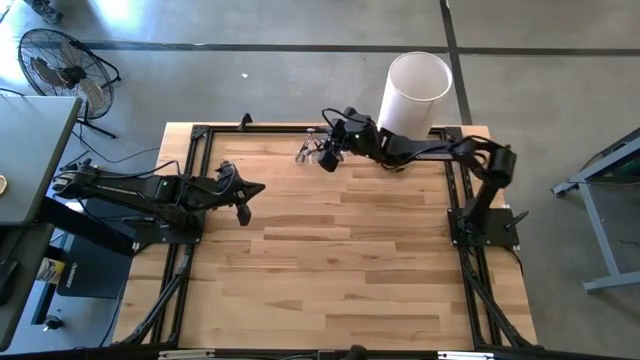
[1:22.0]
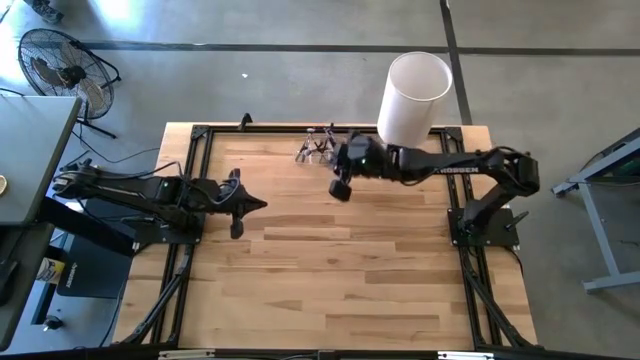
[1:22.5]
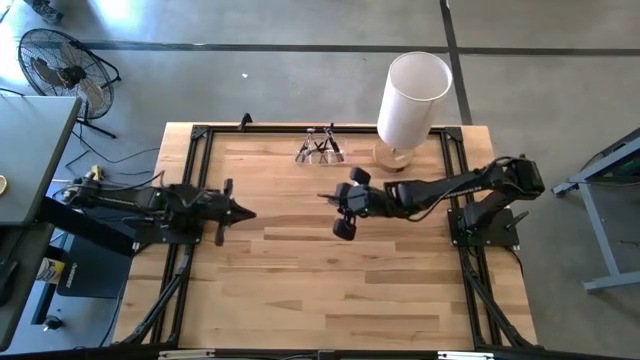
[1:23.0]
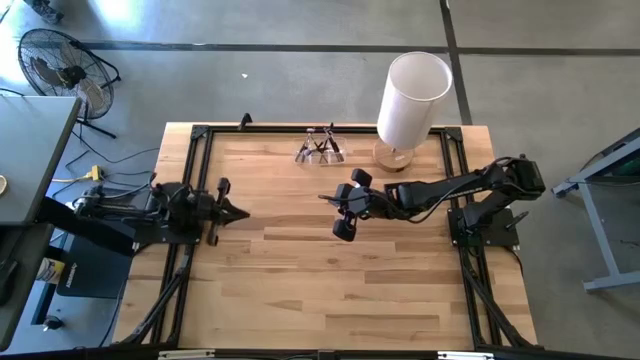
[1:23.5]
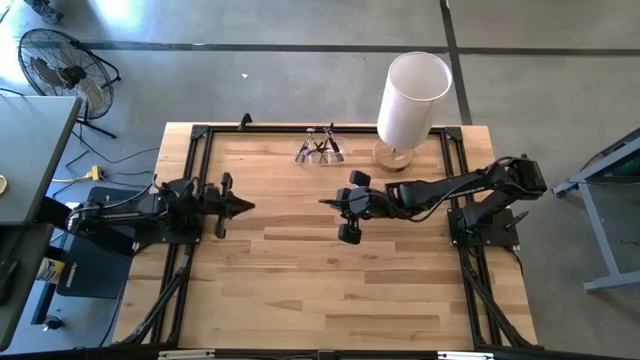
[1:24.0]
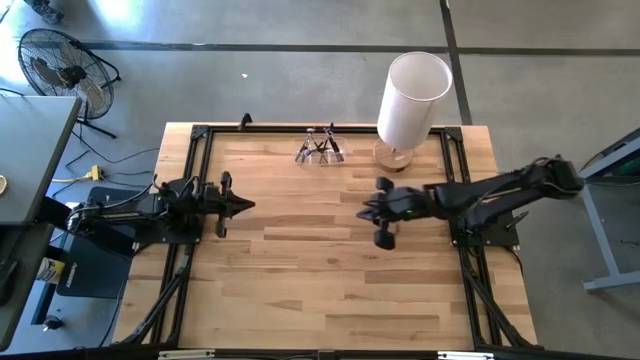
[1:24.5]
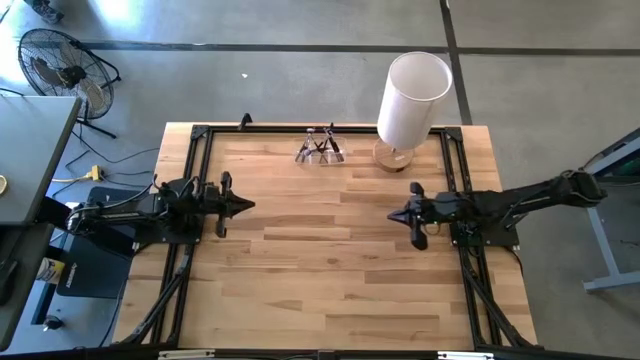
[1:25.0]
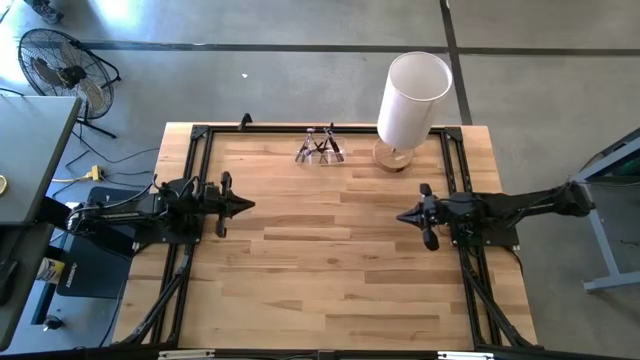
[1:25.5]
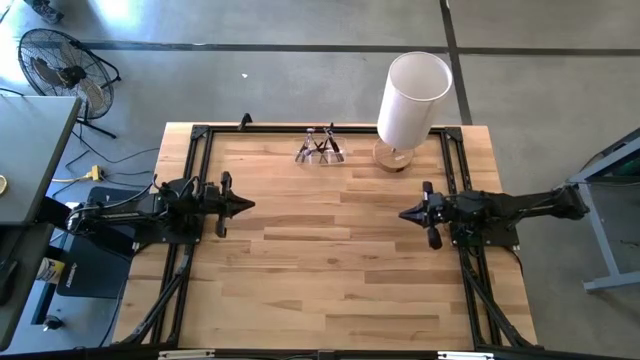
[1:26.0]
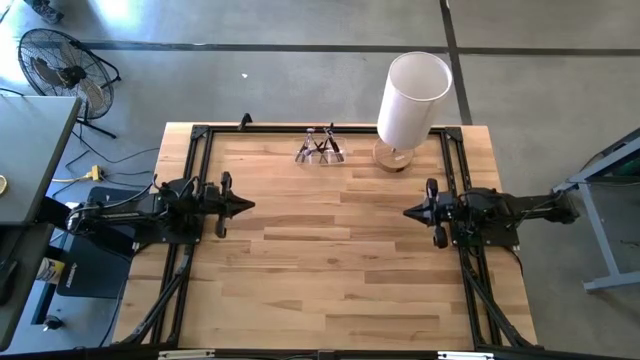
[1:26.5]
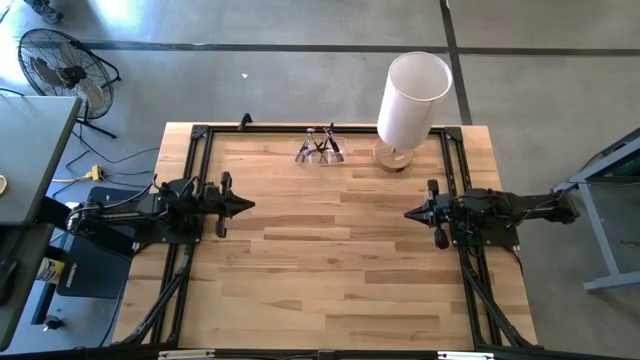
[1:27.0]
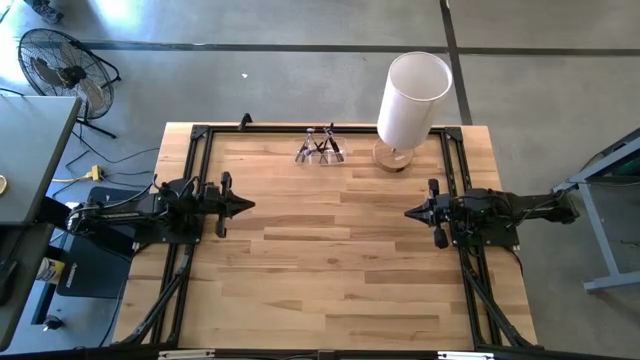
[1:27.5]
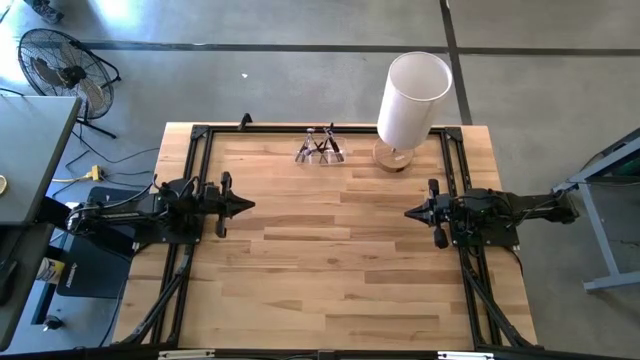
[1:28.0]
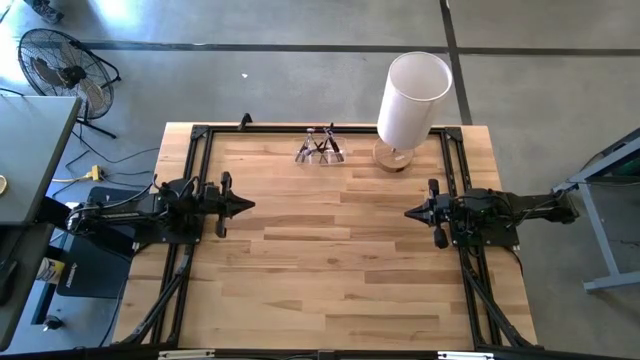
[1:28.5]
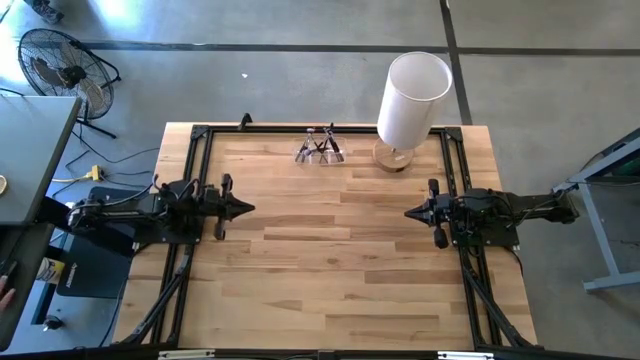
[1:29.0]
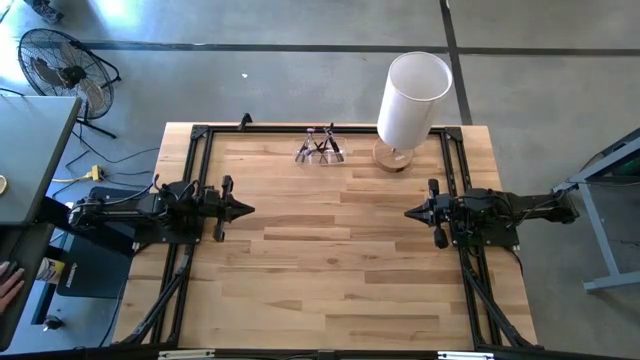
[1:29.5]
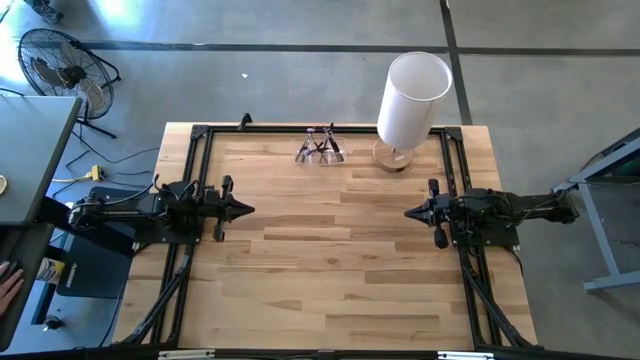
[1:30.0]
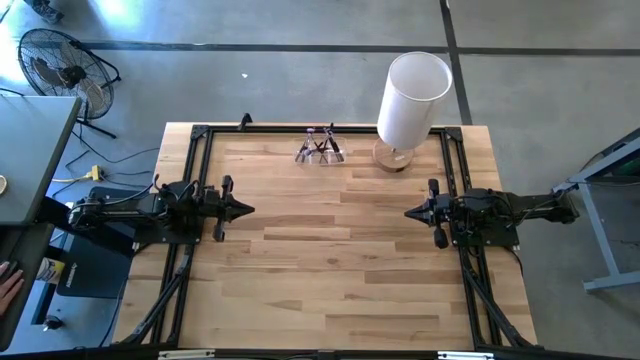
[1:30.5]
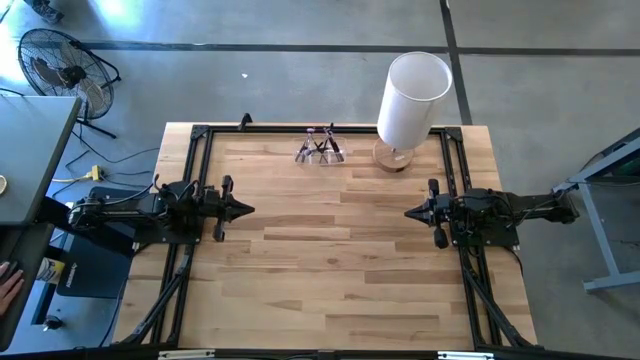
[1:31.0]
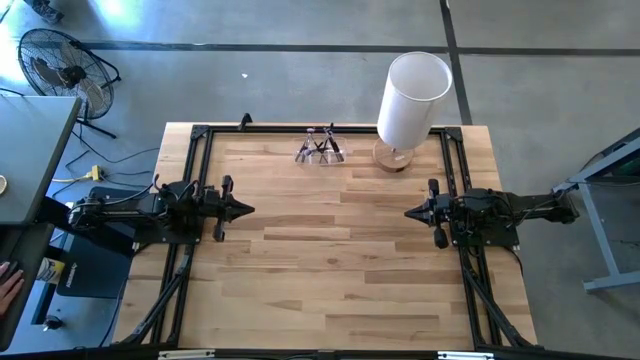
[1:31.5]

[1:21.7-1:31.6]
Task: Put items in baskets/containers
Return to Home Position

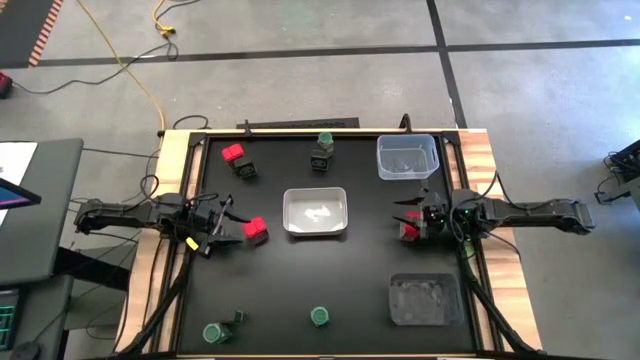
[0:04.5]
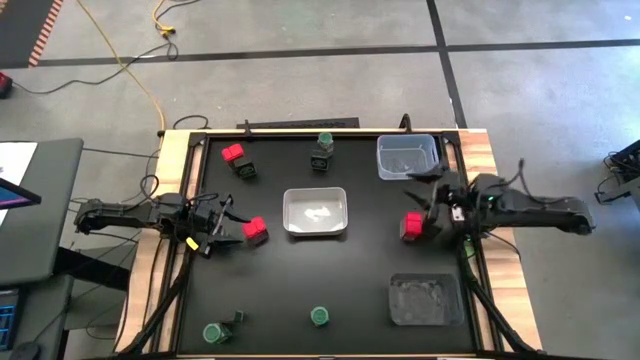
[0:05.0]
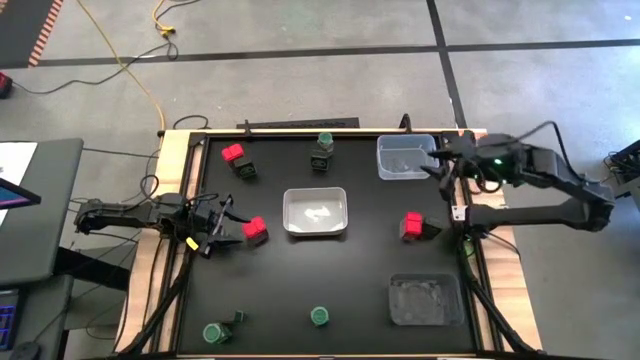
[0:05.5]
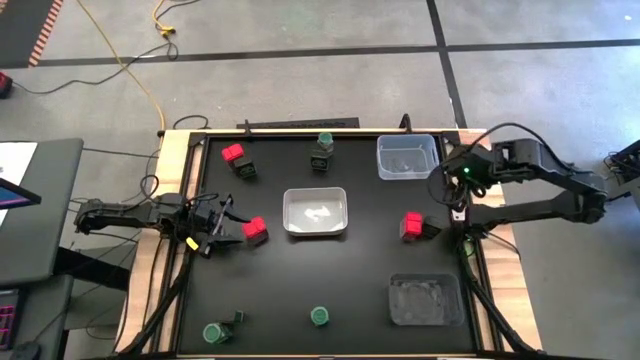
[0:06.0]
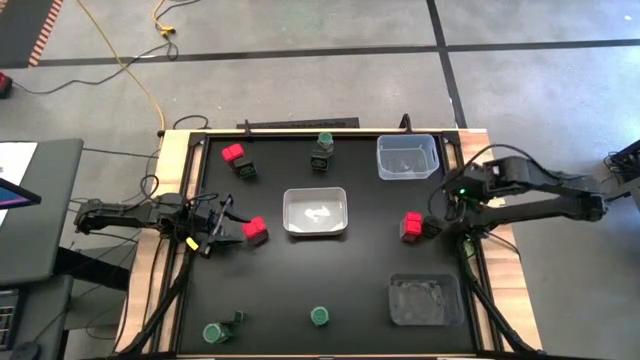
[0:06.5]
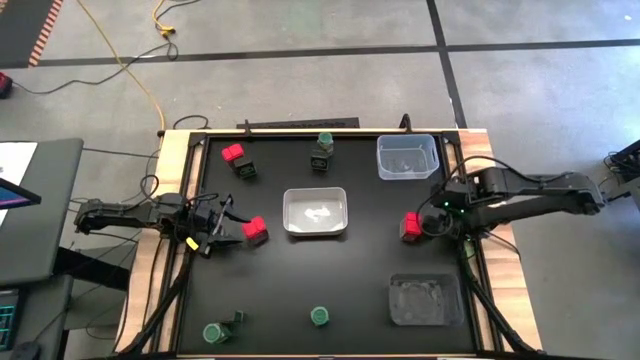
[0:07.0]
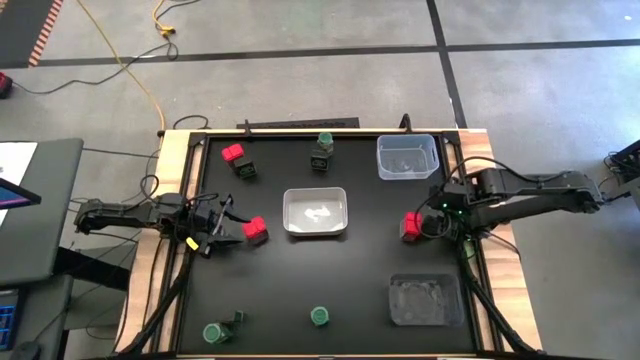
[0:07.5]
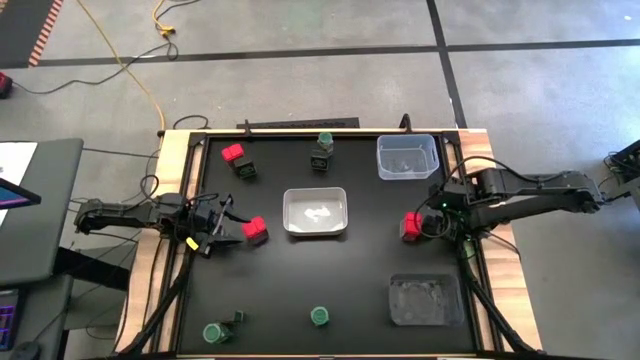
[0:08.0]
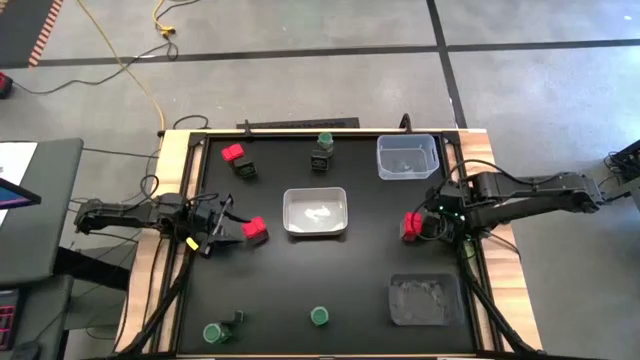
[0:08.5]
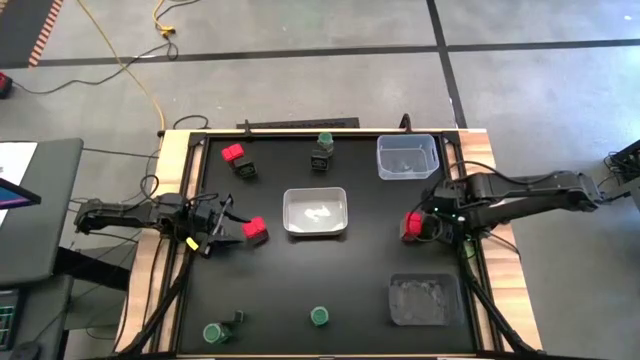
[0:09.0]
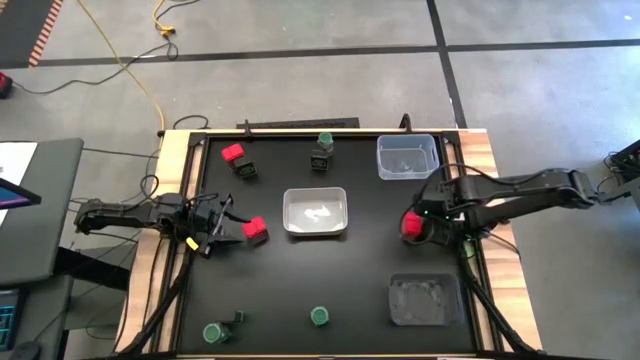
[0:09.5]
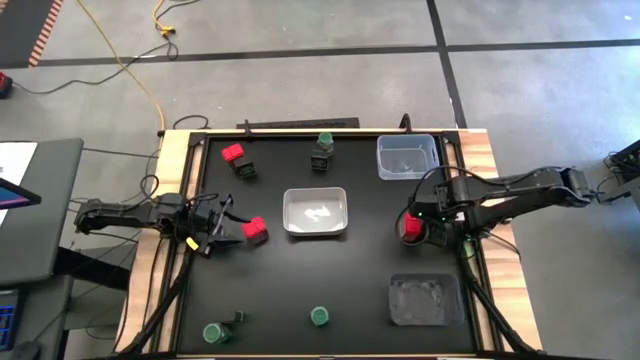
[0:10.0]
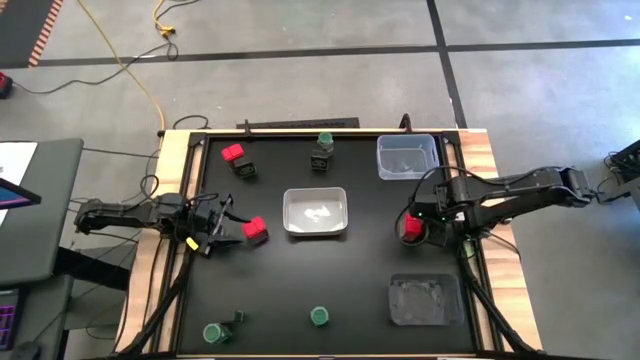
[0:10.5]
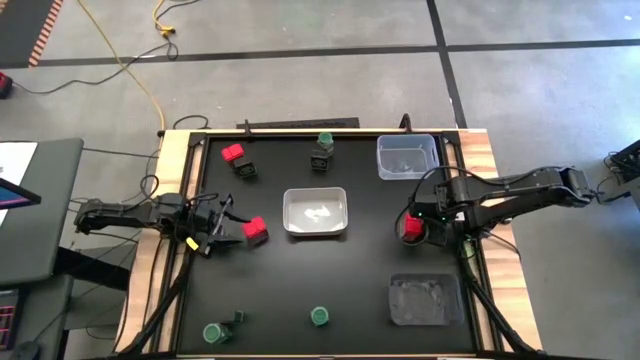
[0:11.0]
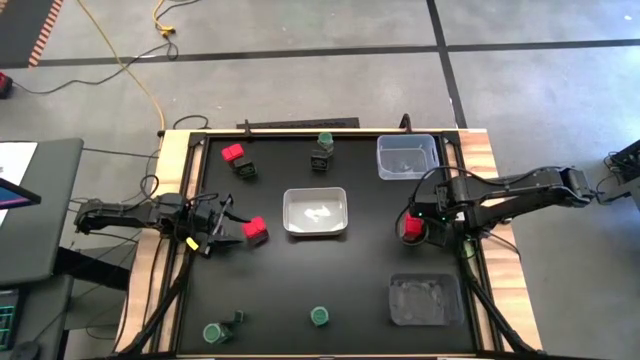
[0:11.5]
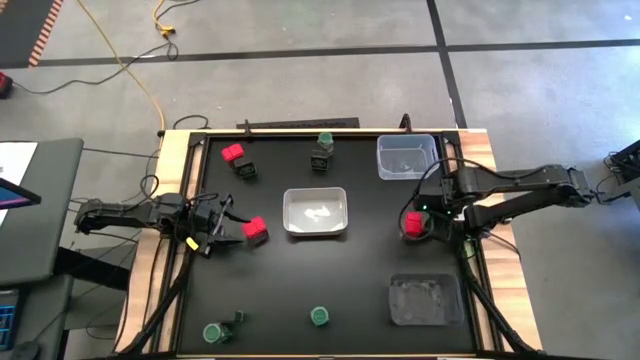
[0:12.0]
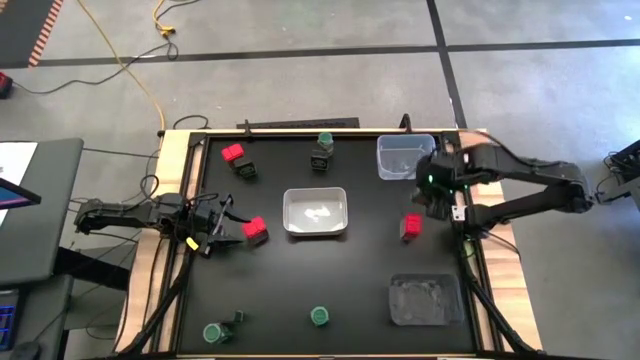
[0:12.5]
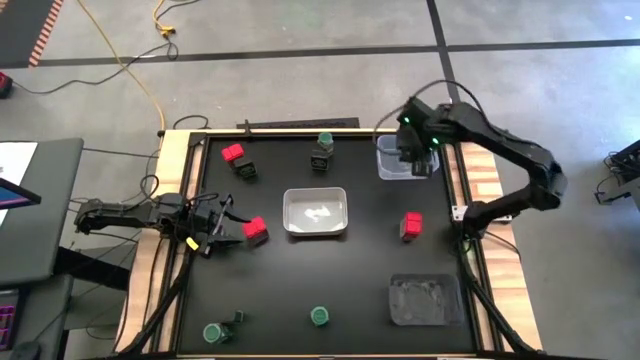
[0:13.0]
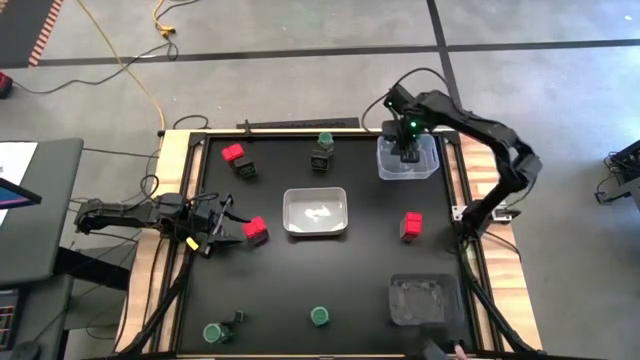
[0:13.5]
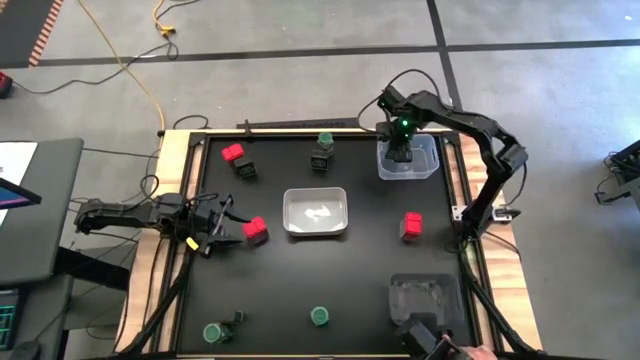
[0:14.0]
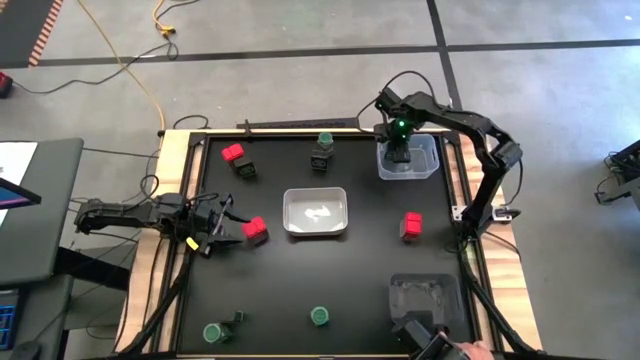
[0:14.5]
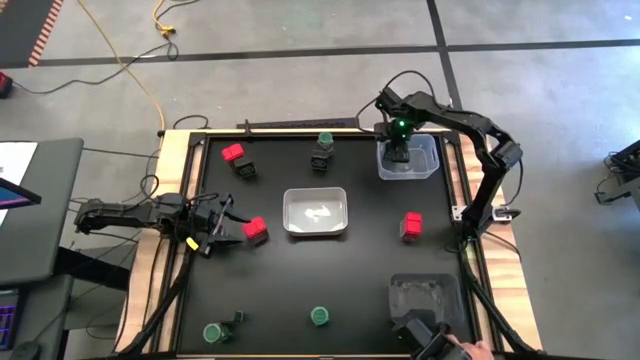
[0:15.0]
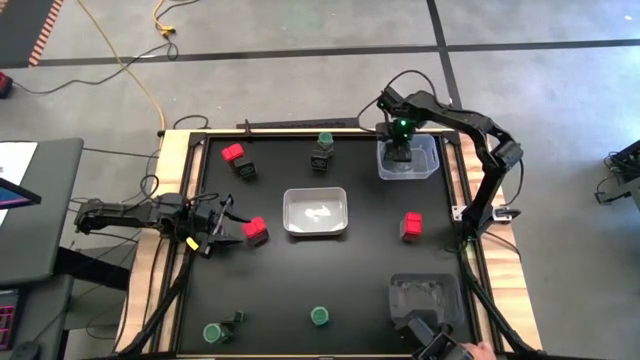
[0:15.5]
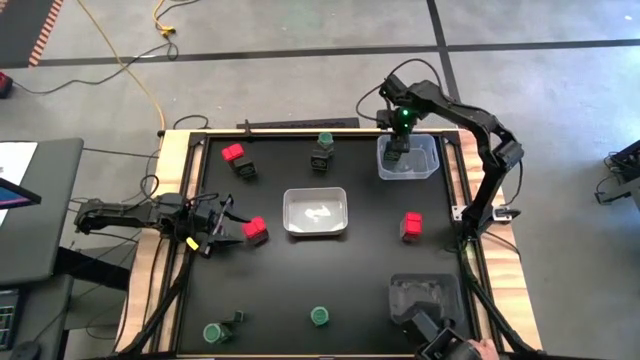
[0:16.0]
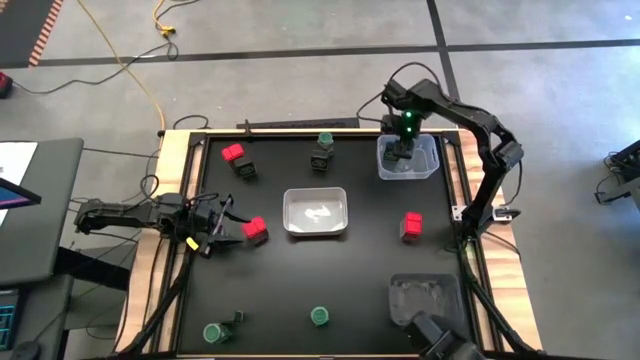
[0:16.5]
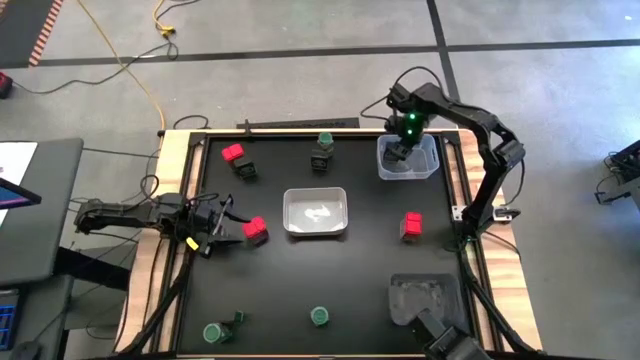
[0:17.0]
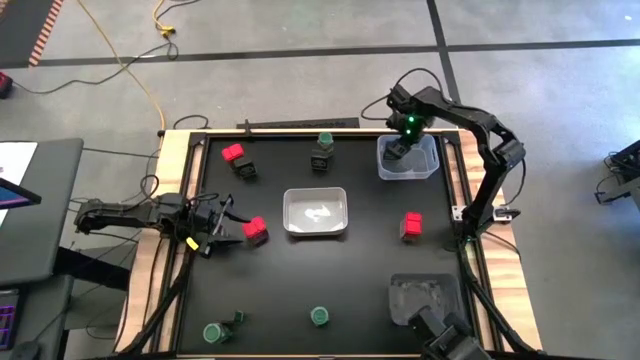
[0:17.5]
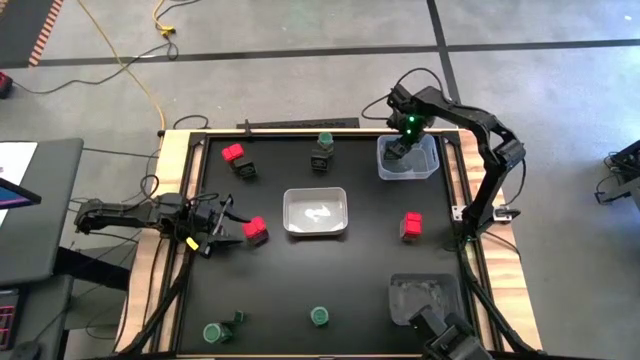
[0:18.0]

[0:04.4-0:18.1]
Task: Sort spices by type
Put the middle right black seasoning can into the transparent bin
